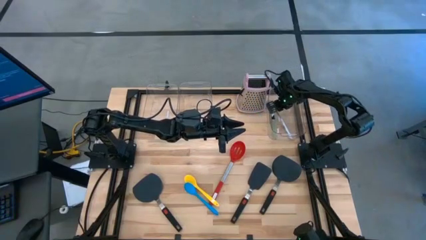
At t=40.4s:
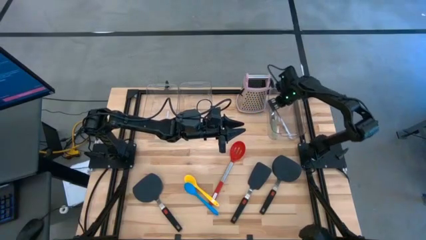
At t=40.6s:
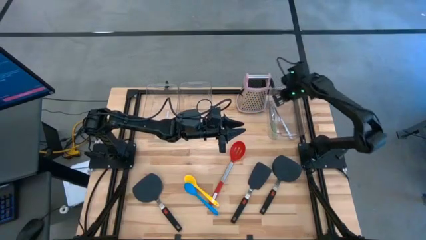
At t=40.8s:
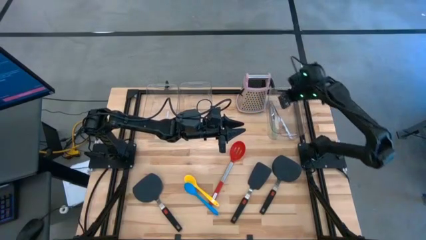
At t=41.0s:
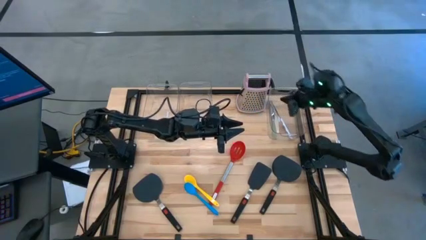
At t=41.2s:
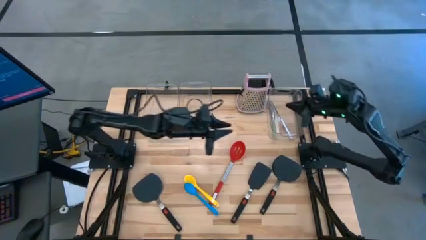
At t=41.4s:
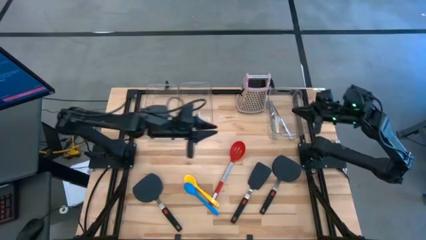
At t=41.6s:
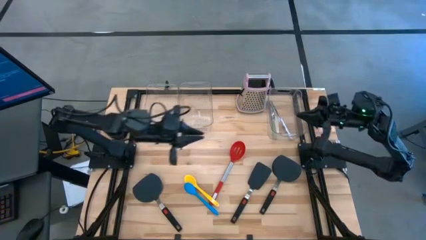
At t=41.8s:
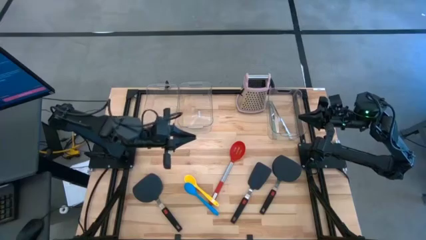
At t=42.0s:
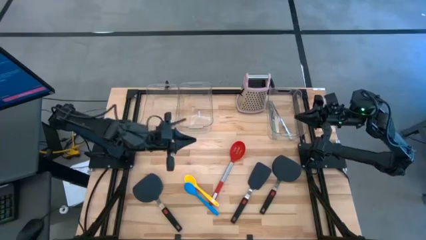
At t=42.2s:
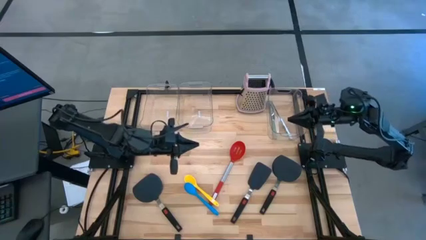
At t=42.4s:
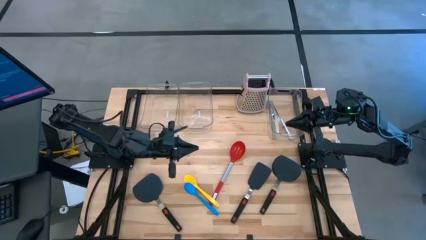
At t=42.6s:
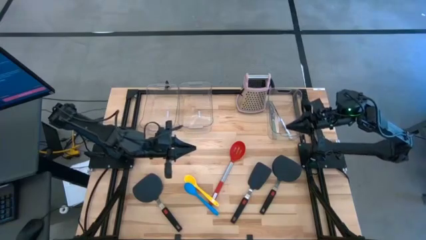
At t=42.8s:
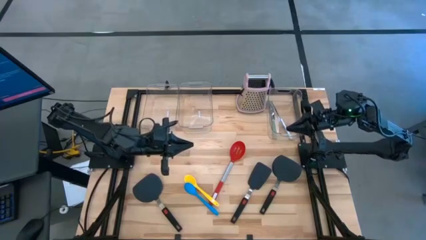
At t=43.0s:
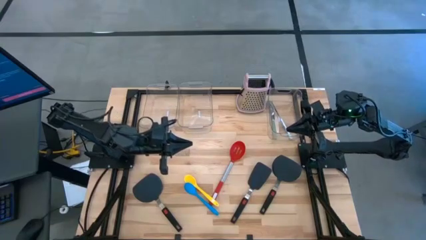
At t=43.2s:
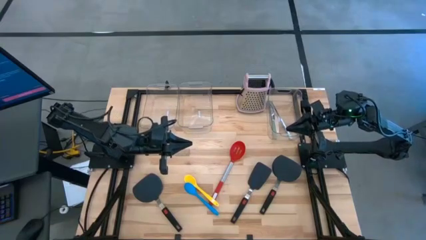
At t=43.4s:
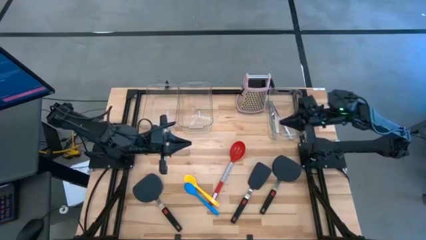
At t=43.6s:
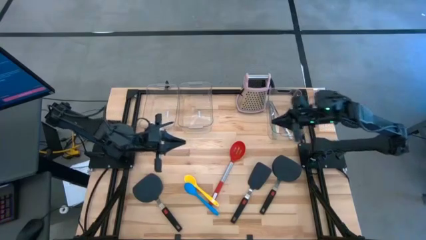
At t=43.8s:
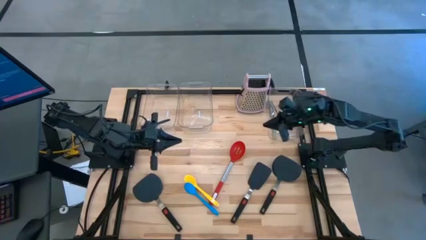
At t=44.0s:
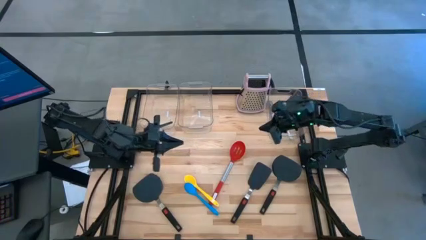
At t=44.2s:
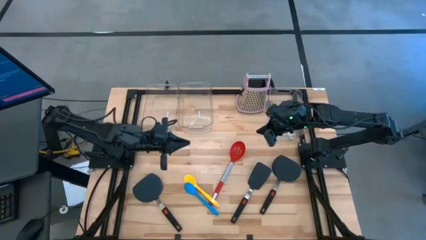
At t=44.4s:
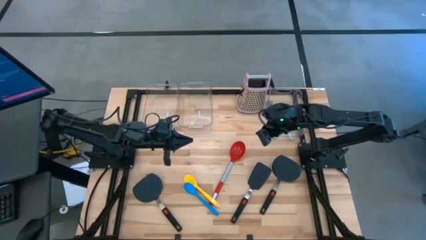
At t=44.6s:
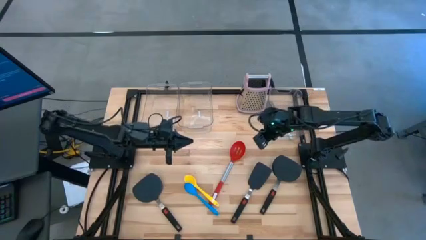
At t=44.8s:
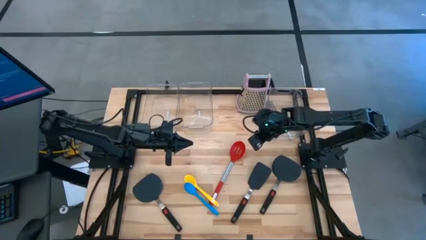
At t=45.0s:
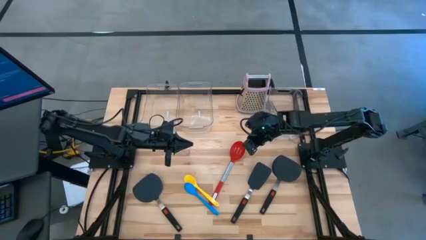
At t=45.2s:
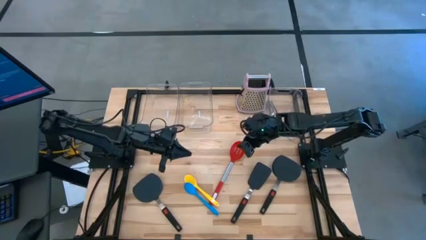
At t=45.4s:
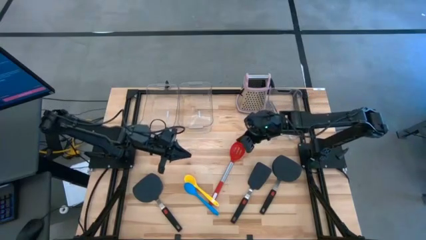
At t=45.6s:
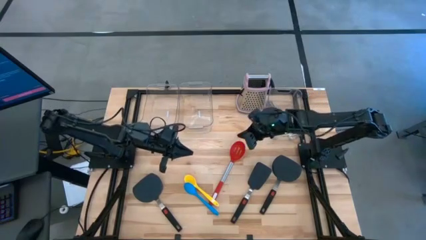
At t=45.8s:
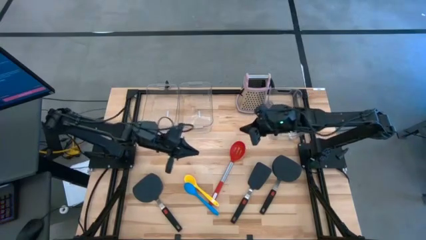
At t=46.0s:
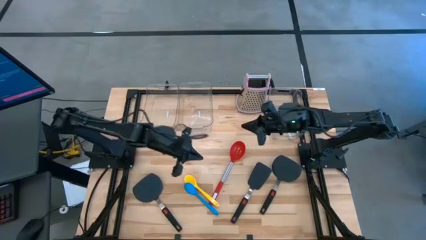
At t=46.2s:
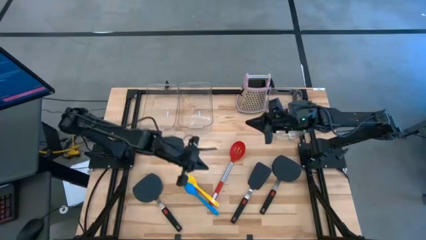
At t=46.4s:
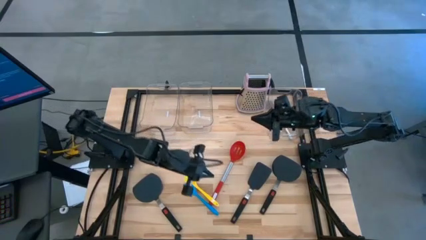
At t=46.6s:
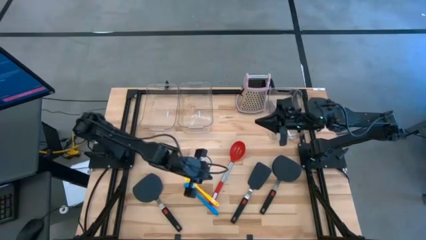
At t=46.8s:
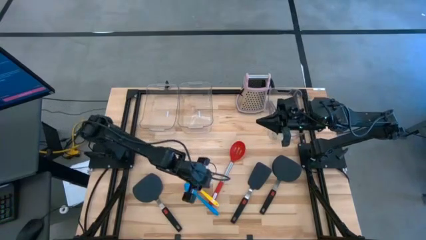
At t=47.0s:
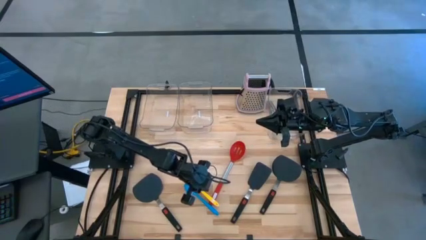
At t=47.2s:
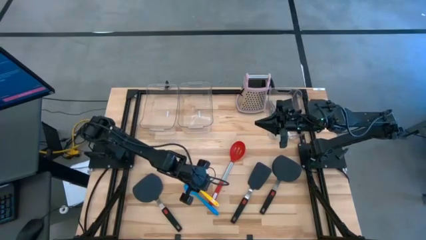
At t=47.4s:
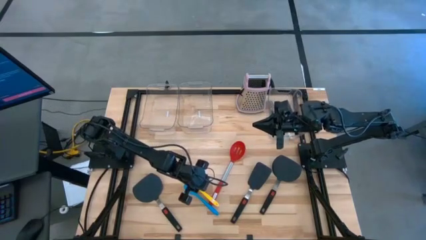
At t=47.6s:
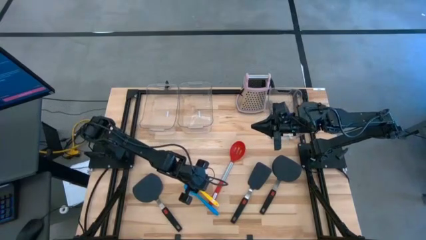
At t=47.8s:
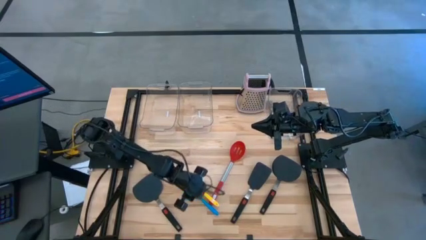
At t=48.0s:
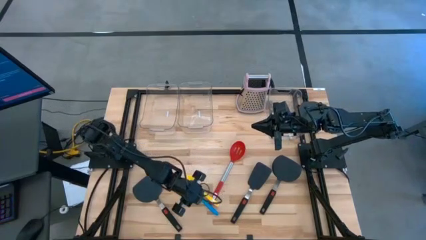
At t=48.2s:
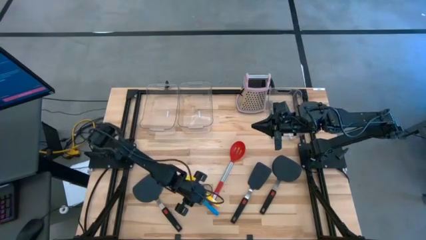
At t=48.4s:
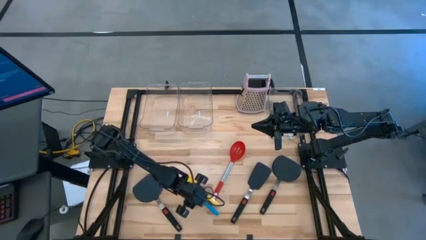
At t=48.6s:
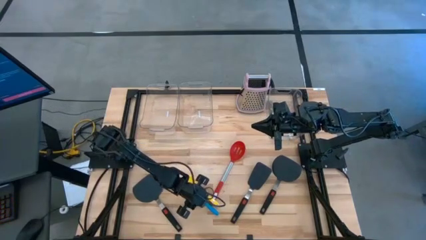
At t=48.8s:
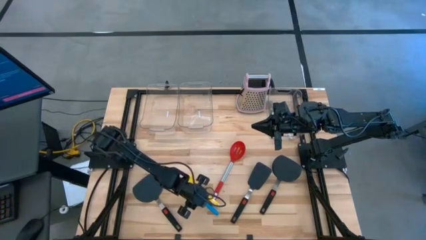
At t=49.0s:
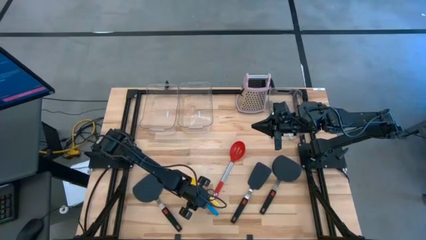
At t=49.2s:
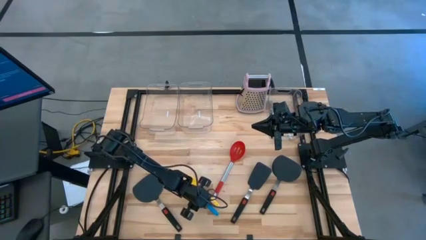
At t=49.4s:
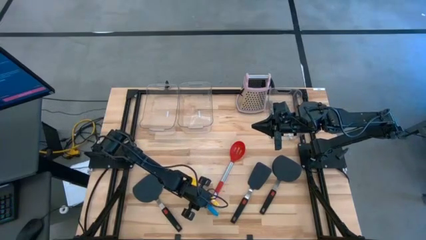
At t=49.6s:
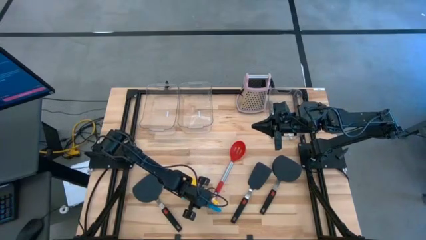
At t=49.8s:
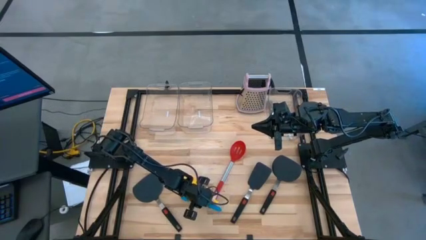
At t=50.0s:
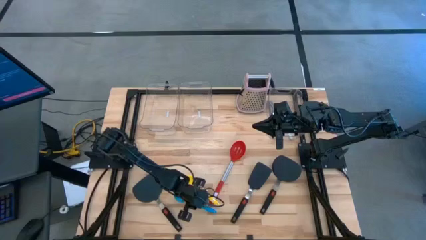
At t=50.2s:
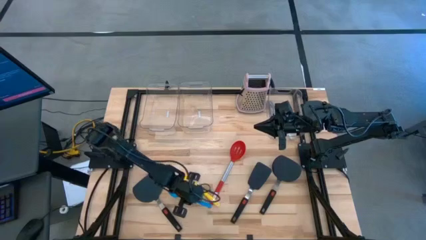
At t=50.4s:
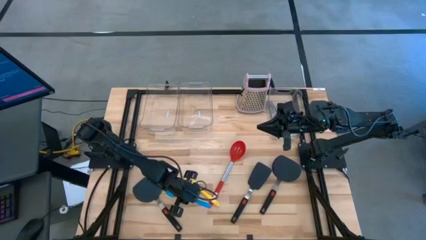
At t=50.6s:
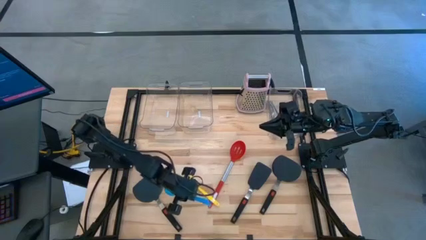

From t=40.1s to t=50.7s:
Task: Pick & Place Kitchen Items
Put the blue serving spoon into the left transparent bin

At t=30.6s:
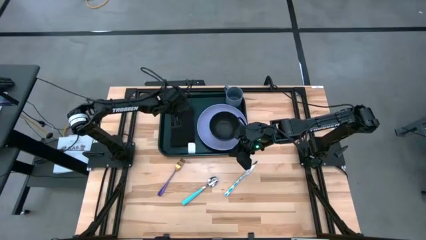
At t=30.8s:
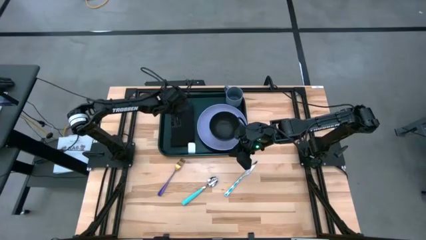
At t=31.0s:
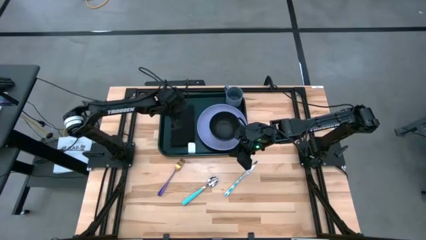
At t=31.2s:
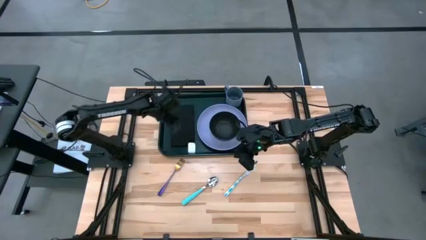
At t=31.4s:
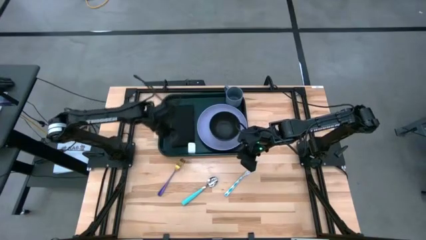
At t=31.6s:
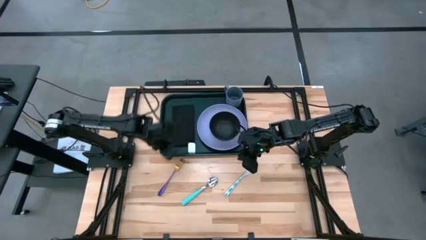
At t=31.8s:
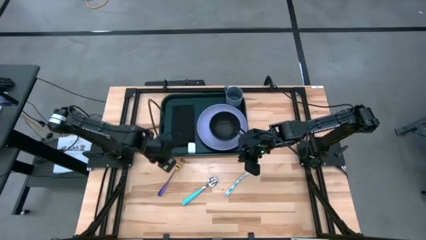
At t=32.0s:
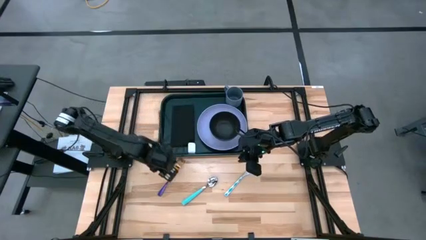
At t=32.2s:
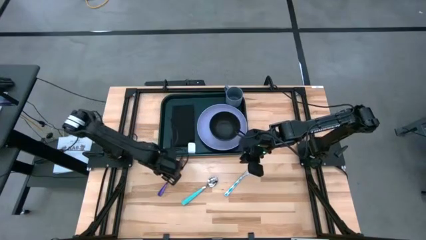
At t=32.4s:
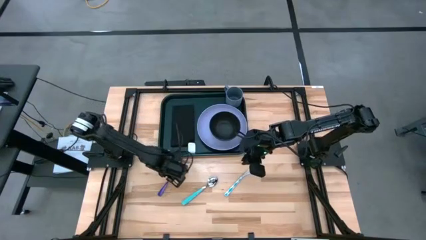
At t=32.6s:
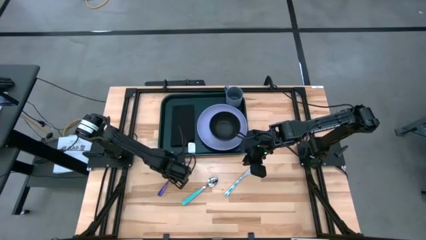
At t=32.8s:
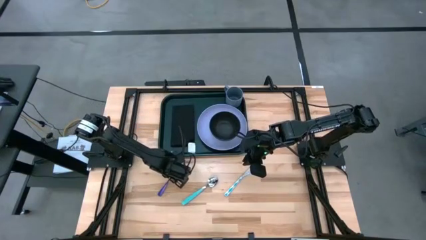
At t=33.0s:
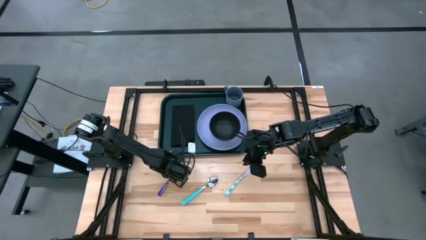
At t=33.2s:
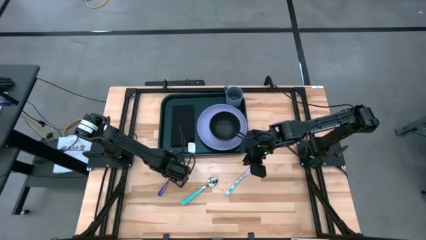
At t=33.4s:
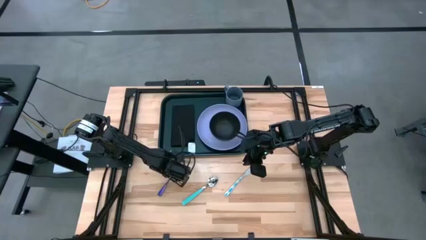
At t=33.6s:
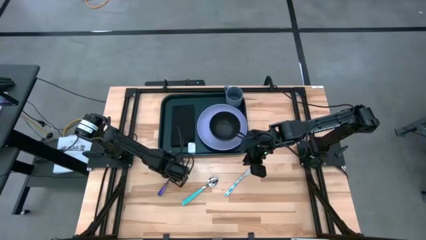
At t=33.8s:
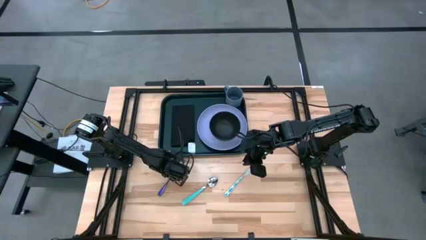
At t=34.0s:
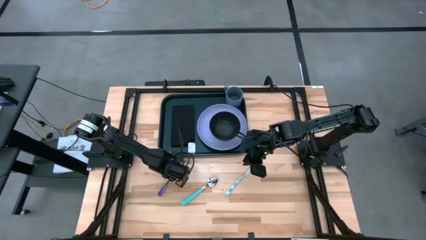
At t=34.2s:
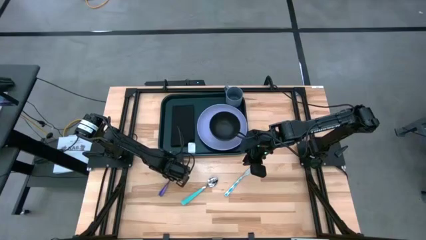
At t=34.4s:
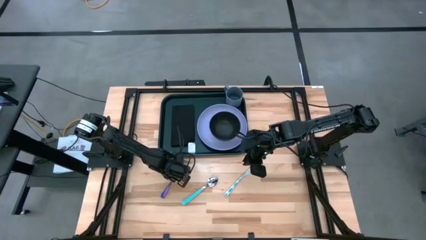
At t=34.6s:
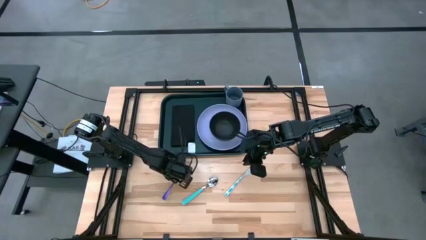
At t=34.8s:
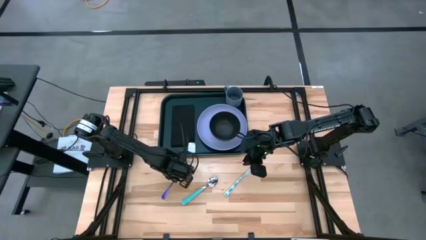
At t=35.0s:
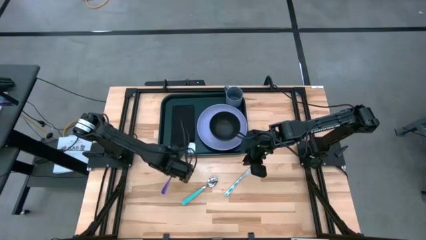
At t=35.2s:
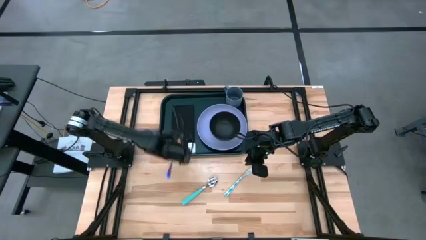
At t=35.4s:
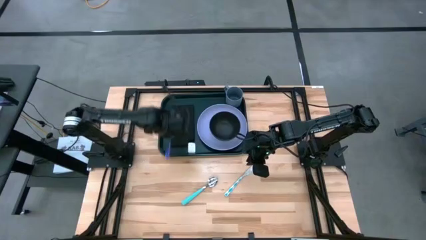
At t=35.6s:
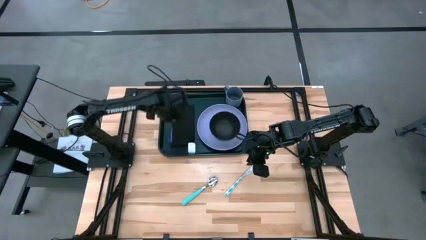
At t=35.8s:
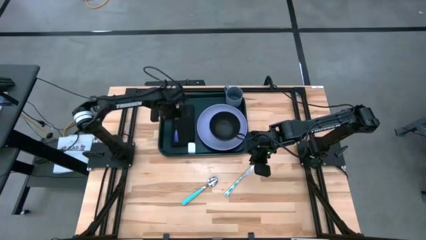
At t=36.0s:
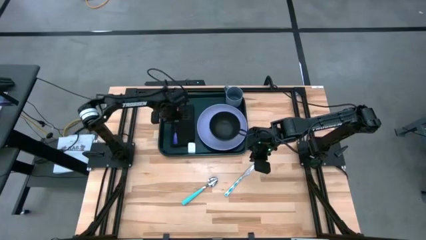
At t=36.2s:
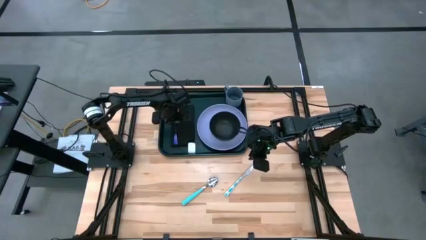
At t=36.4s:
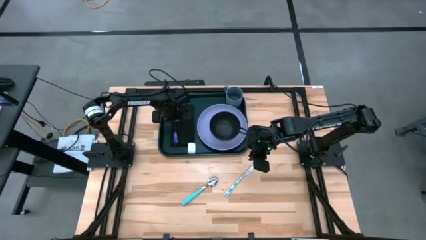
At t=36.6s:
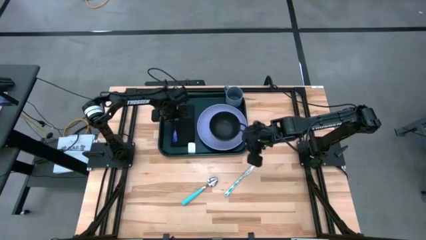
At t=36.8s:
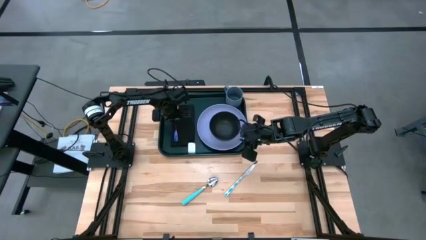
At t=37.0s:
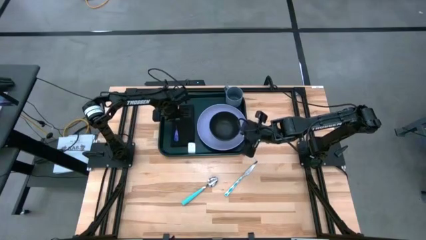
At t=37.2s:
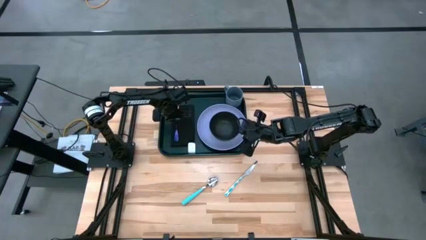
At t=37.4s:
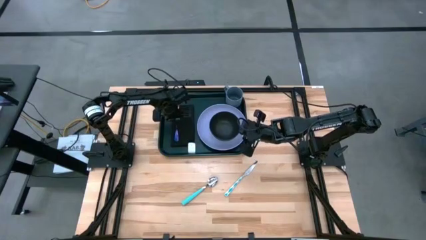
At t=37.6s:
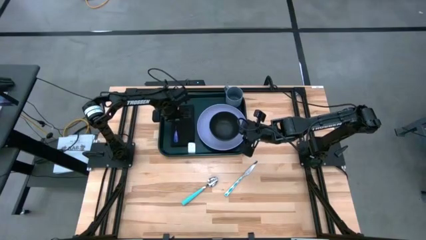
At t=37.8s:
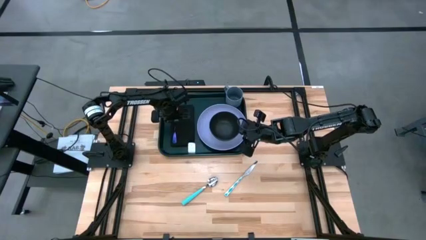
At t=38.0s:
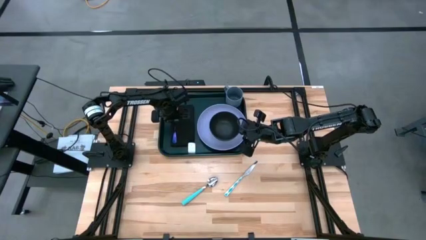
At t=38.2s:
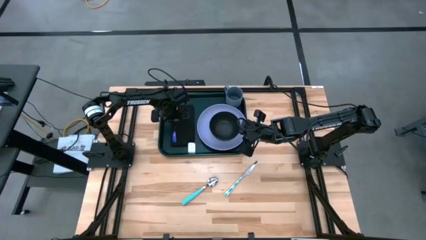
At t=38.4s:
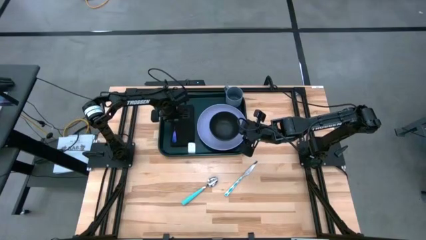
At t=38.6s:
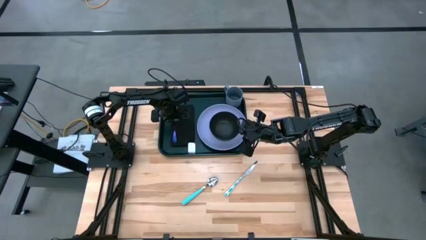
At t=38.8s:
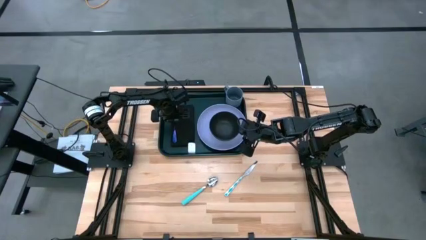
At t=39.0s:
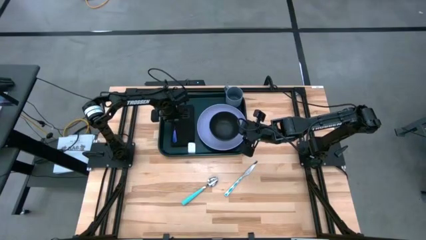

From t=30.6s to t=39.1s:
Task: Set up tray
Put the fork on the napkin on the serving tray
